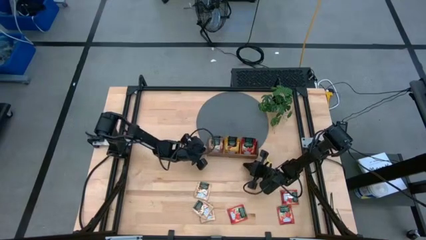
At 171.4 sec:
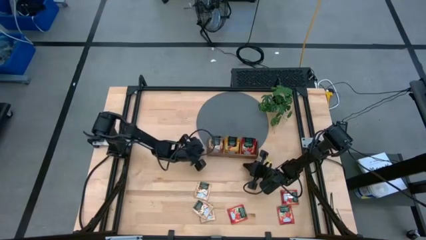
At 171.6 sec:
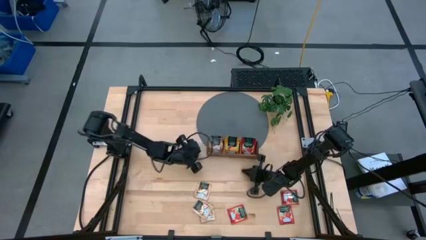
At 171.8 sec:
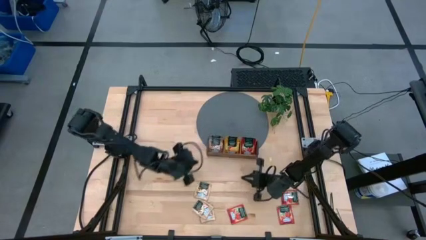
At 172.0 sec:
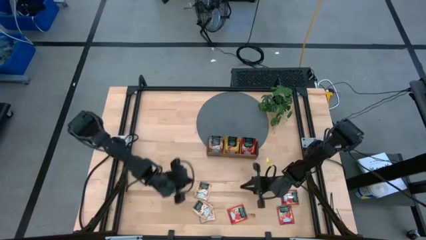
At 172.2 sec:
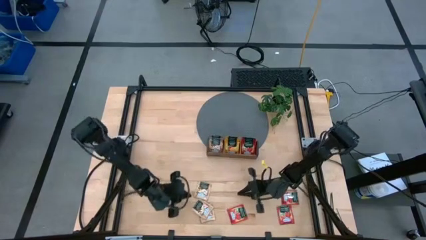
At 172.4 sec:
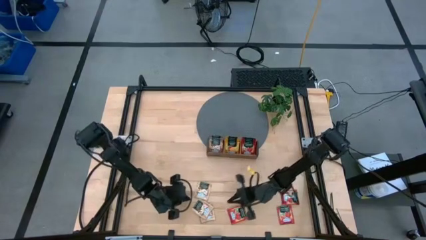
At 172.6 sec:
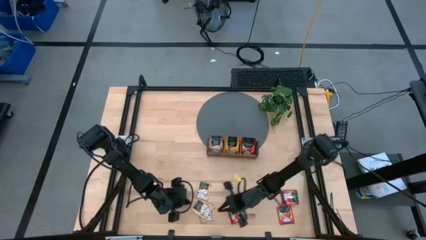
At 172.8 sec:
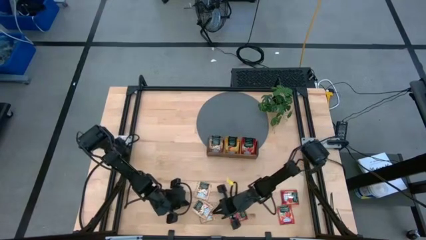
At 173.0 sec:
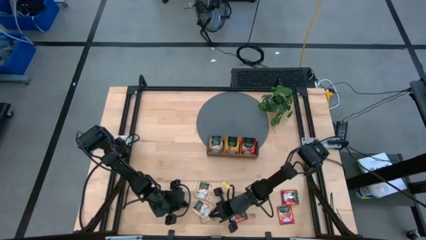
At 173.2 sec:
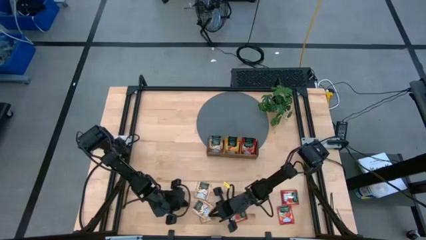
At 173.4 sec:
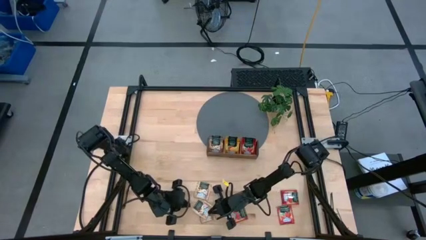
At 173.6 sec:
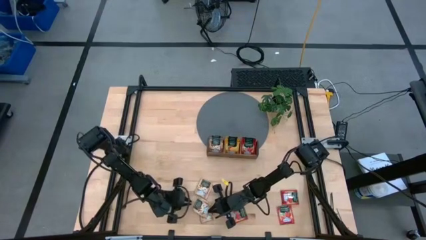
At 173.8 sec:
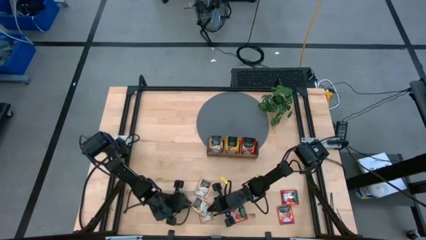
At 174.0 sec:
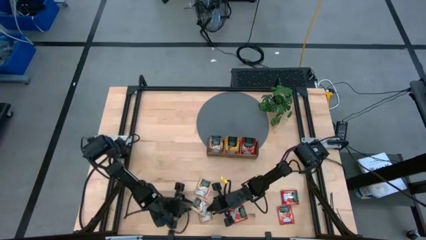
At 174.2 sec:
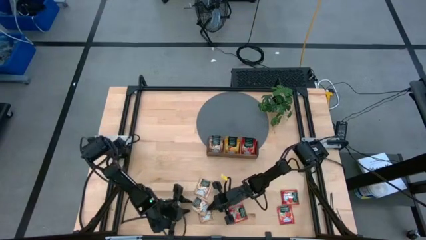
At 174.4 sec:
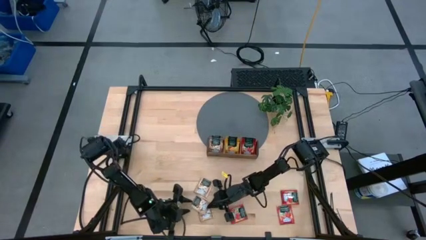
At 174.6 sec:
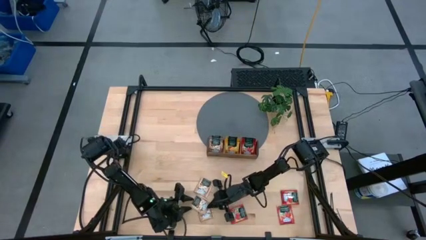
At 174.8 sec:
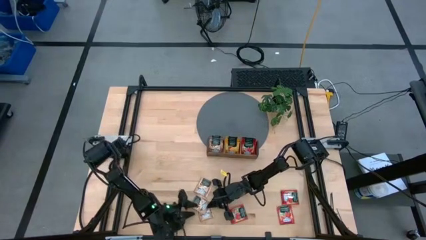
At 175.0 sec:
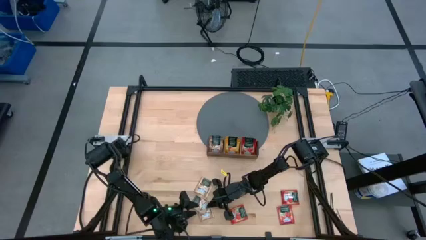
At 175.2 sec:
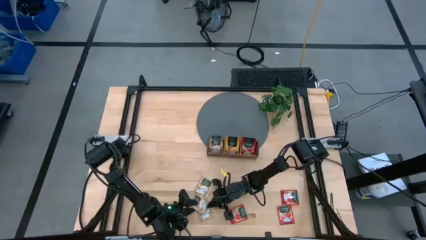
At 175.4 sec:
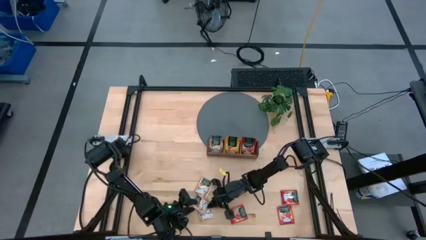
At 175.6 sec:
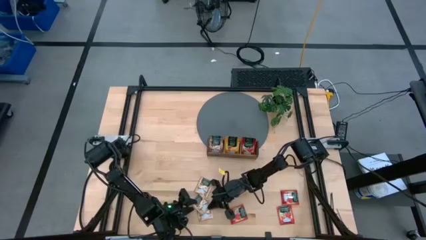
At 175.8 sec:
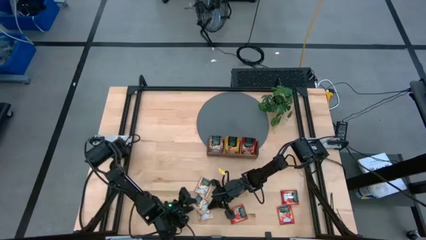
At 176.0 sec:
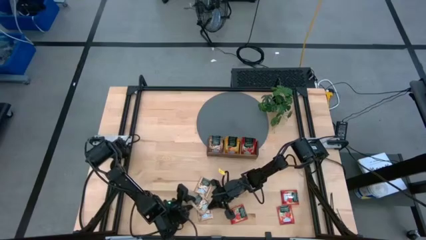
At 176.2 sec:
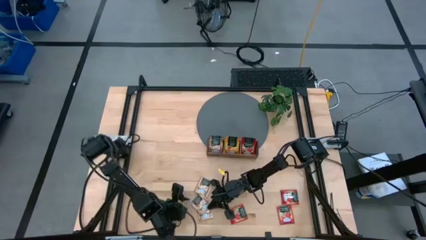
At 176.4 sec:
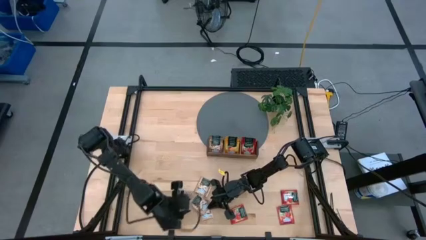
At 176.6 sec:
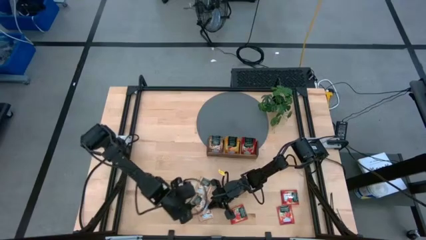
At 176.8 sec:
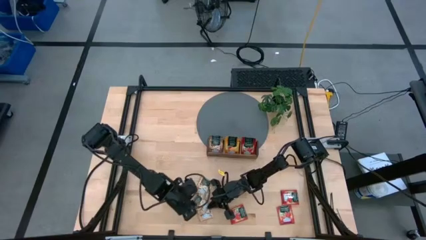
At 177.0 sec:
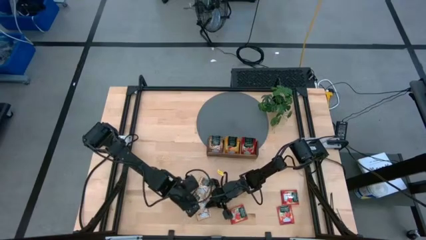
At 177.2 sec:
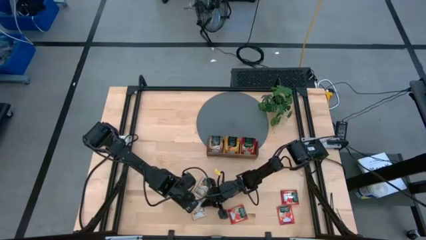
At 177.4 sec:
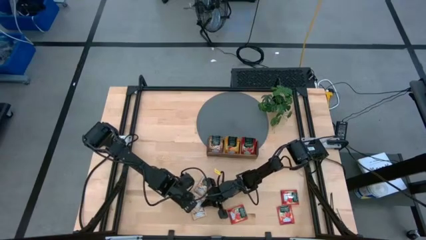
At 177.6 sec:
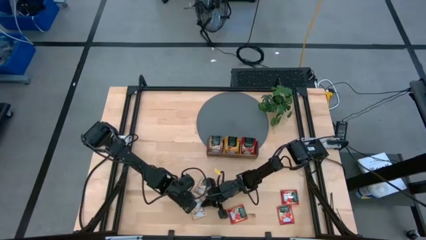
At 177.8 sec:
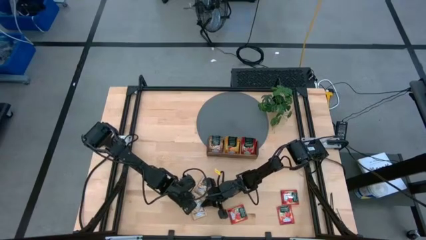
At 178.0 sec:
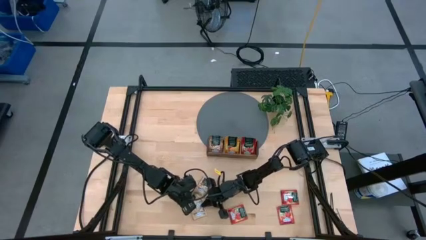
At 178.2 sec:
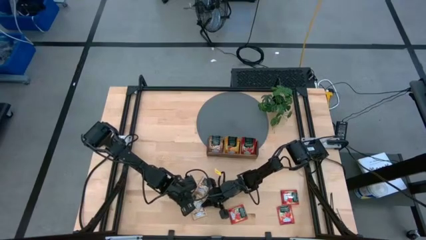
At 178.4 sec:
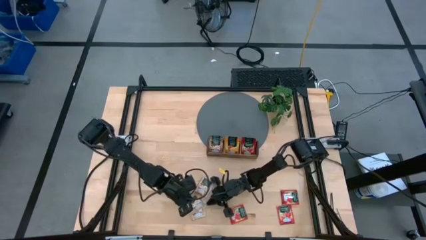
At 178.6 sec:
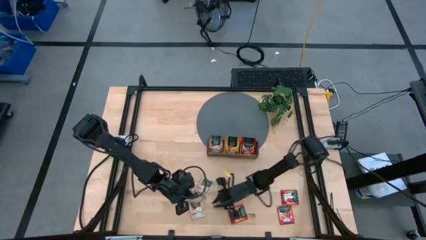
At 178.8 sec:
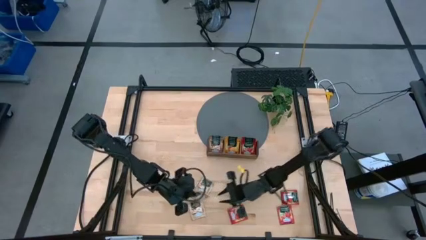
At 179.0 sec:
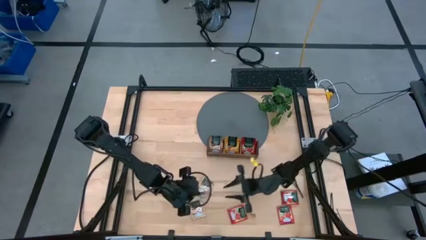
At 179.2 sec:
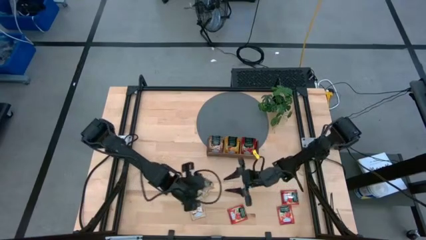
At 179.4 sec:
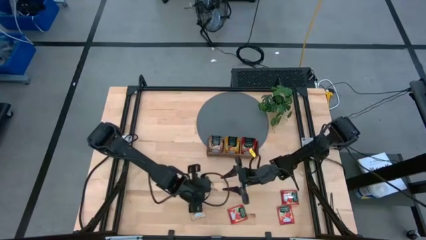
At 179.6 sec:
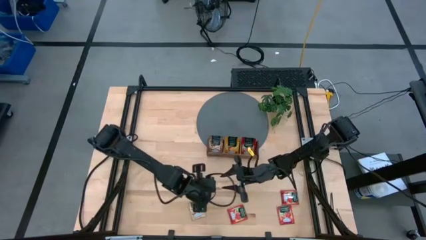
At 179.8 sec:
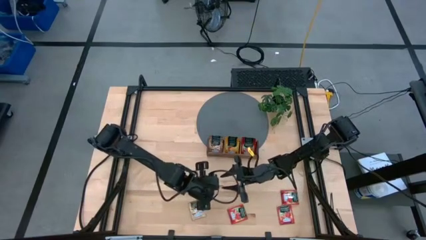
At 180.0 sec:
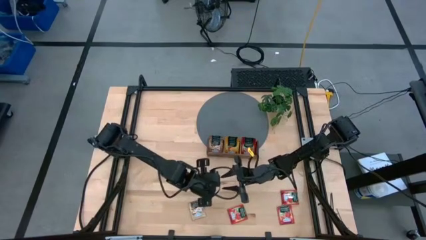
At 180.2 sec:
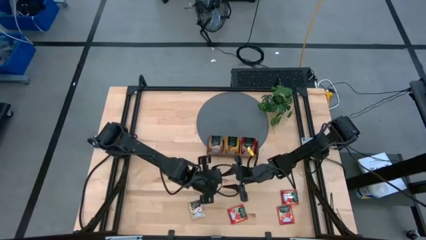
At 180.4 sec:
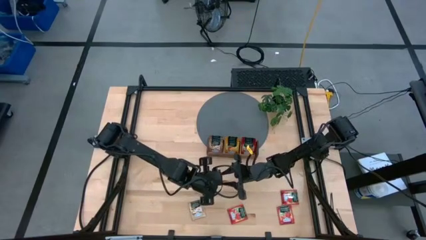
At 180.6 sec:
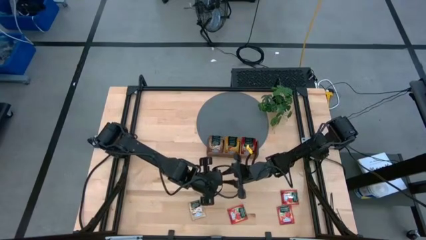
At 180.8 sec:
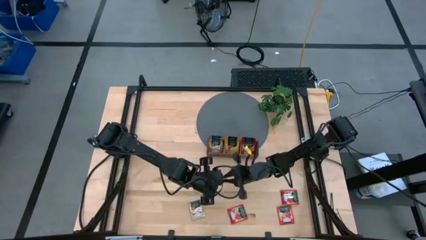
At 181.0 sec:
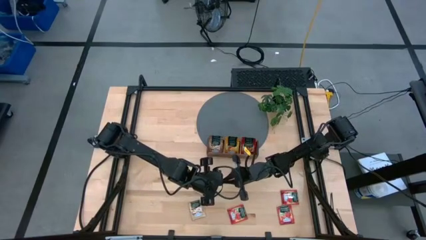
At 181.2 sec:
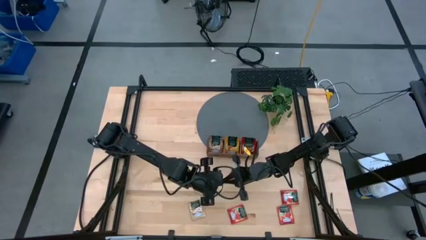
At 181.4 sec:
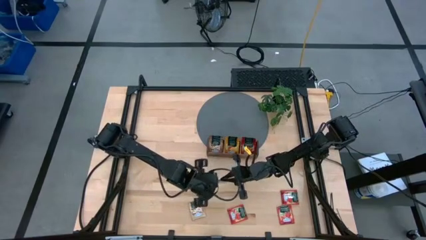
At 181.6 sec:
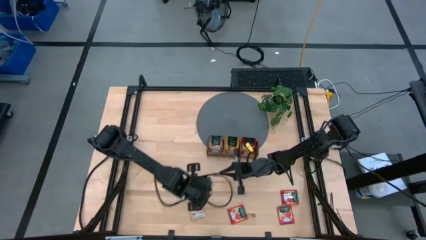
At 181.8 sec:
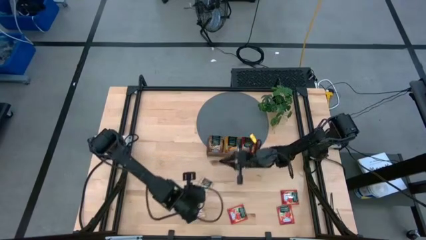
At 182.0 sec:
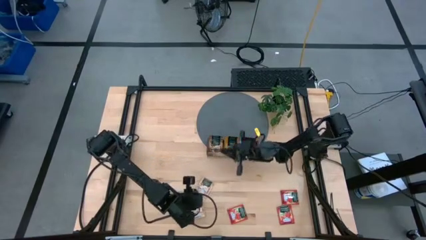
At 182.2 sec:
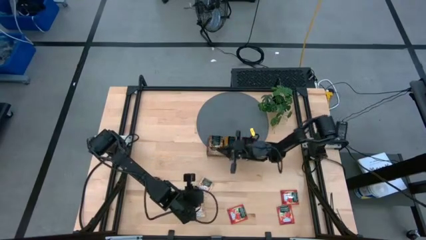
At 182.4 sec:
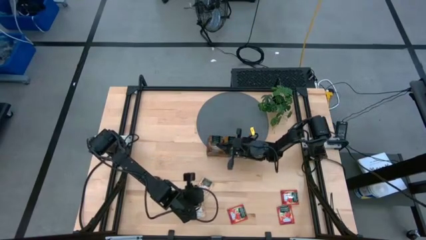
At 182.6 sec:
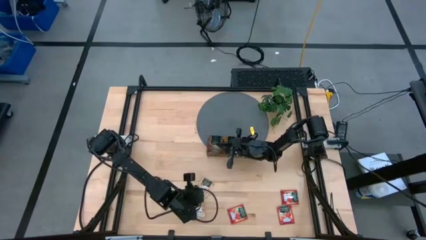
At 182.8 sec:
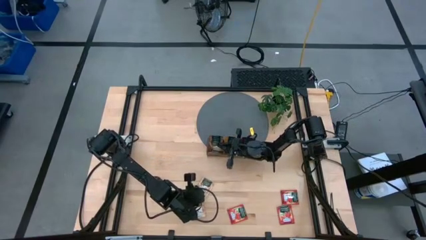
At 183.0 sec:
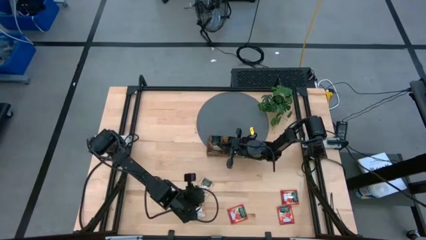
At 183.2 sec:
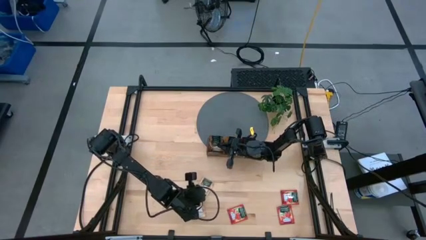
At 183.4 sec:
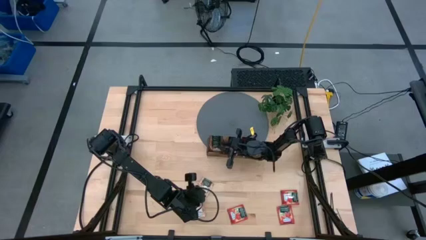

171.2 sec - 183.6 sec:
Task: Pick & Place Tea
Put the brown tea bag into the left wooden organizer
